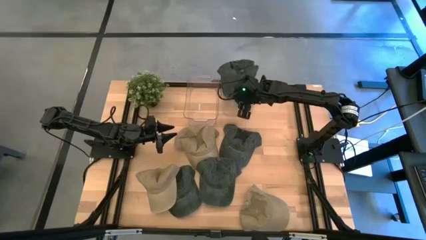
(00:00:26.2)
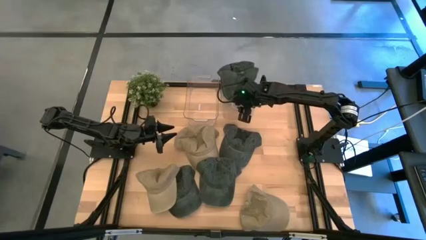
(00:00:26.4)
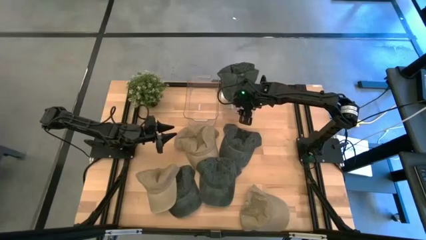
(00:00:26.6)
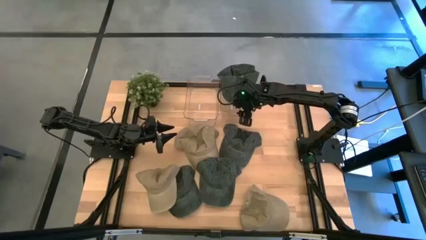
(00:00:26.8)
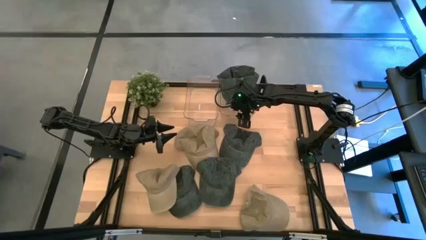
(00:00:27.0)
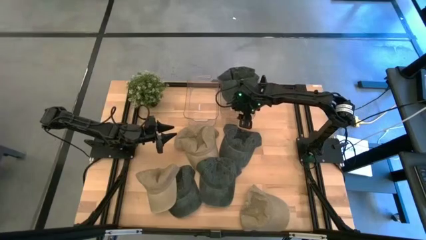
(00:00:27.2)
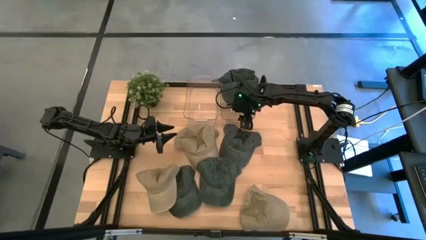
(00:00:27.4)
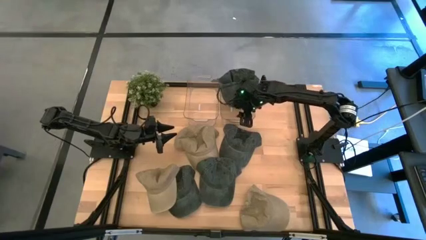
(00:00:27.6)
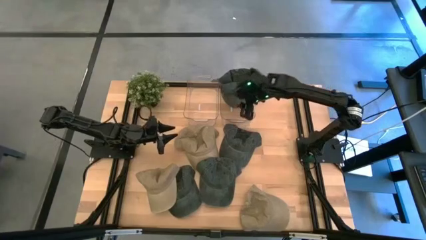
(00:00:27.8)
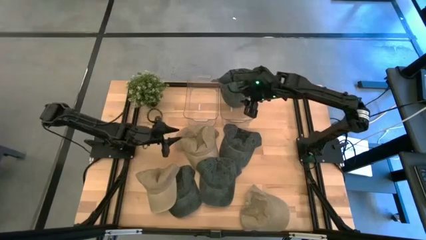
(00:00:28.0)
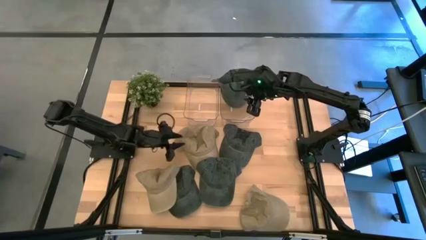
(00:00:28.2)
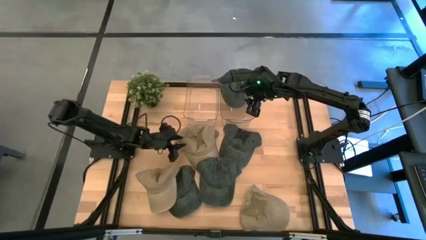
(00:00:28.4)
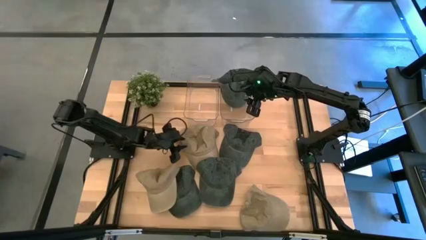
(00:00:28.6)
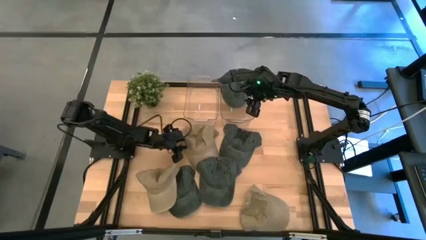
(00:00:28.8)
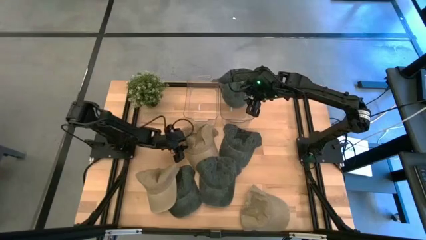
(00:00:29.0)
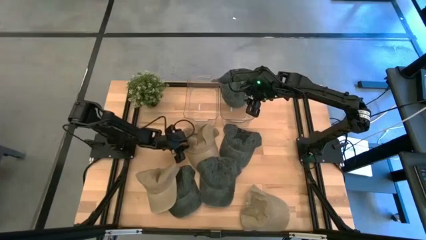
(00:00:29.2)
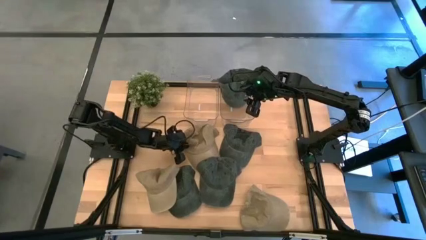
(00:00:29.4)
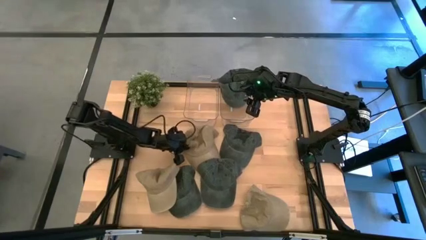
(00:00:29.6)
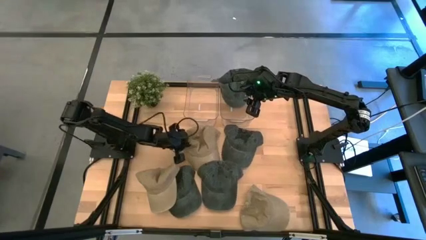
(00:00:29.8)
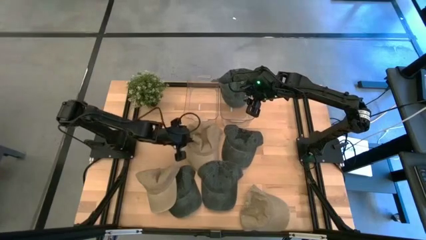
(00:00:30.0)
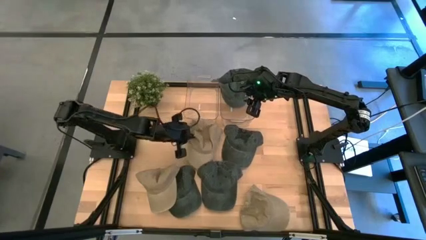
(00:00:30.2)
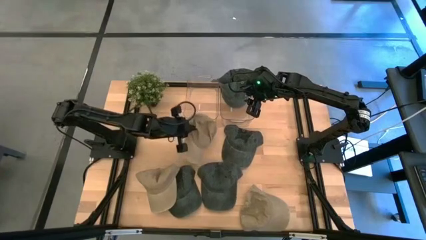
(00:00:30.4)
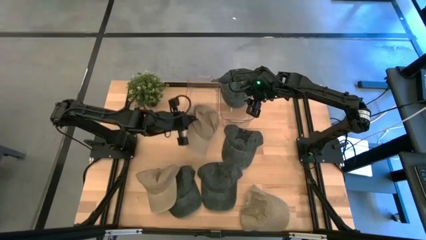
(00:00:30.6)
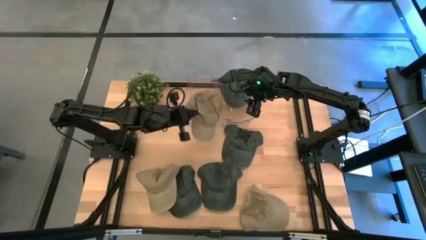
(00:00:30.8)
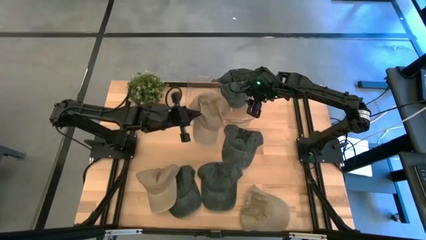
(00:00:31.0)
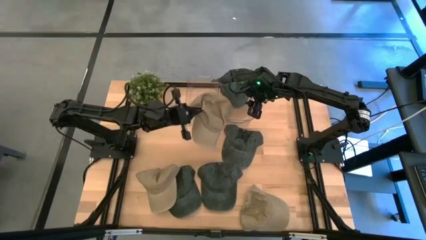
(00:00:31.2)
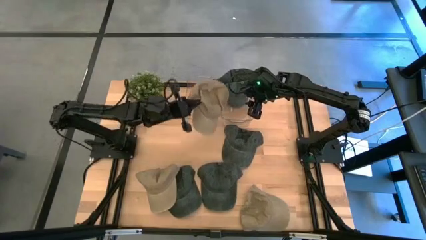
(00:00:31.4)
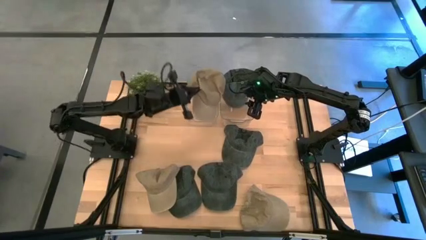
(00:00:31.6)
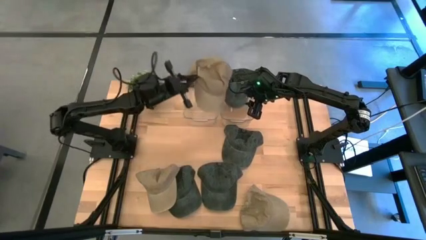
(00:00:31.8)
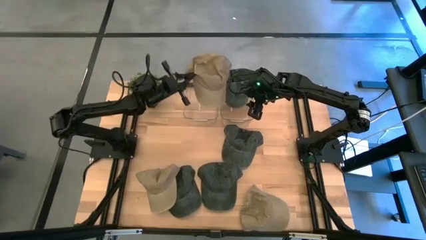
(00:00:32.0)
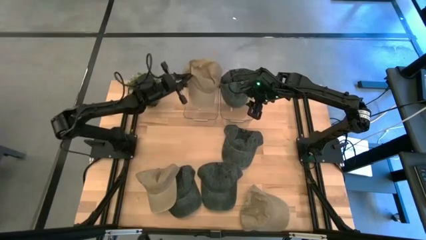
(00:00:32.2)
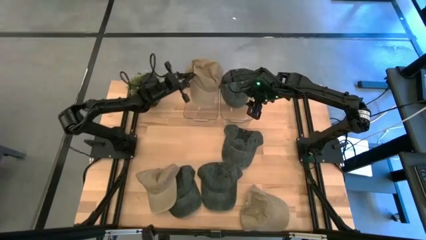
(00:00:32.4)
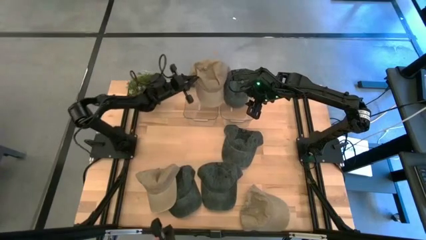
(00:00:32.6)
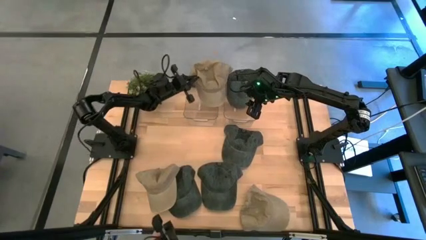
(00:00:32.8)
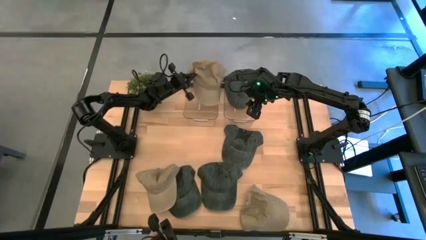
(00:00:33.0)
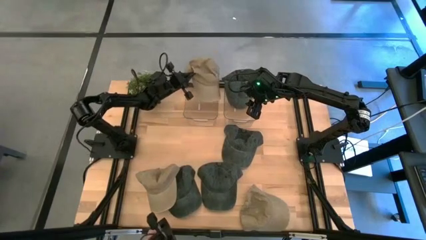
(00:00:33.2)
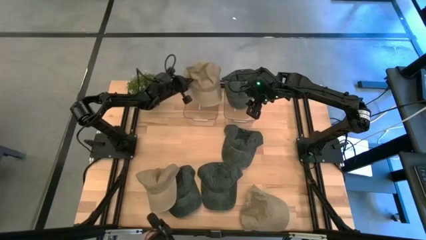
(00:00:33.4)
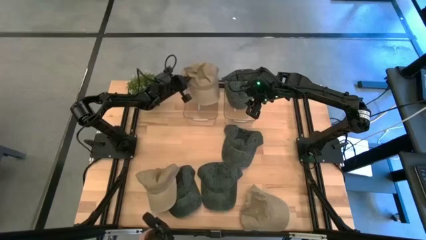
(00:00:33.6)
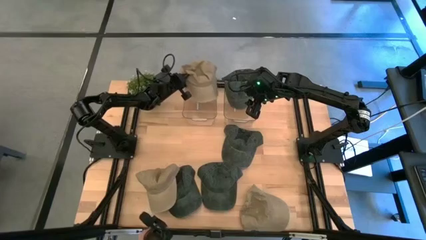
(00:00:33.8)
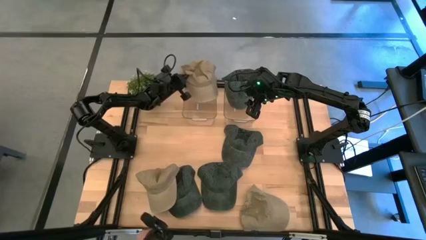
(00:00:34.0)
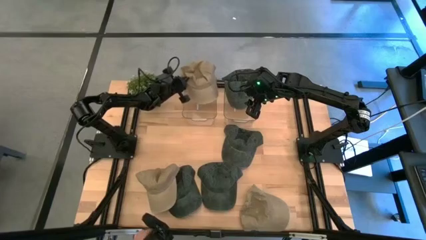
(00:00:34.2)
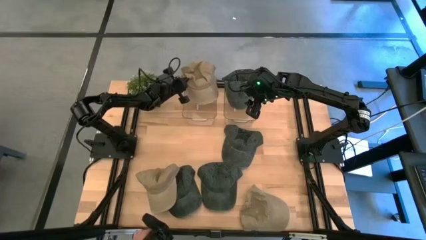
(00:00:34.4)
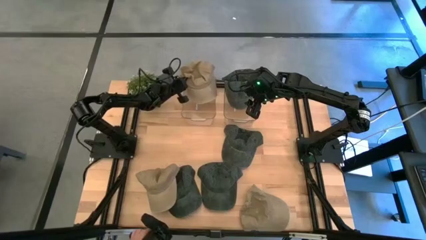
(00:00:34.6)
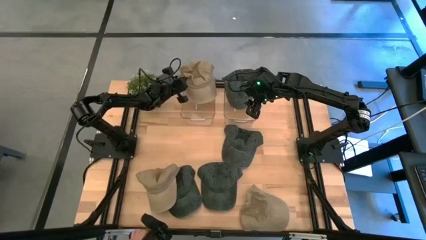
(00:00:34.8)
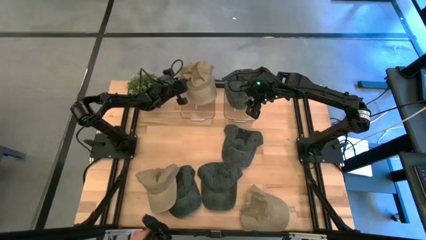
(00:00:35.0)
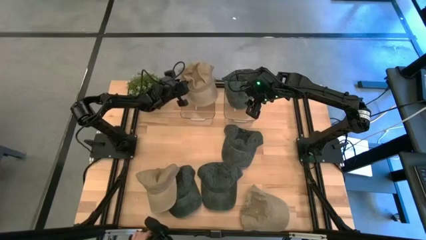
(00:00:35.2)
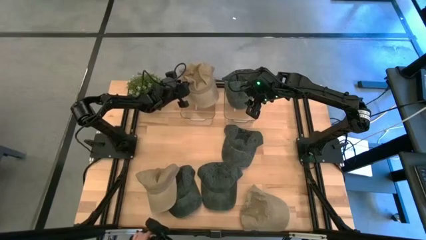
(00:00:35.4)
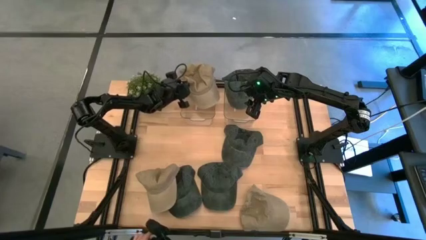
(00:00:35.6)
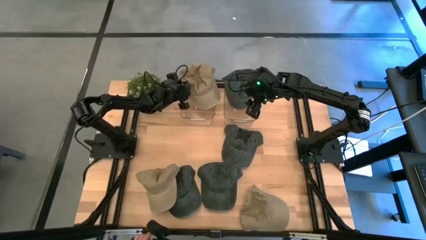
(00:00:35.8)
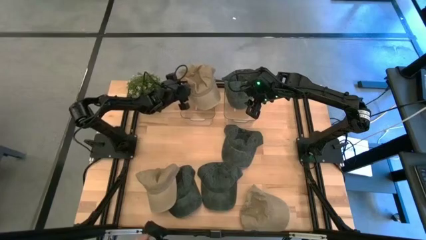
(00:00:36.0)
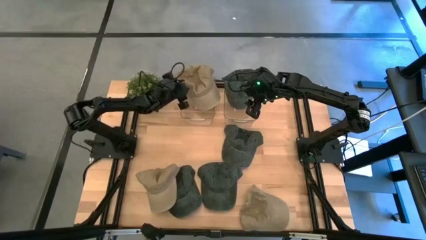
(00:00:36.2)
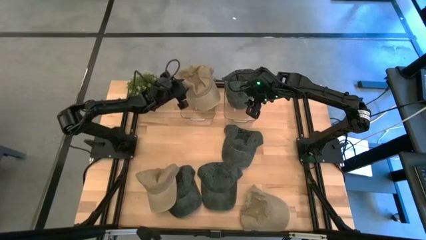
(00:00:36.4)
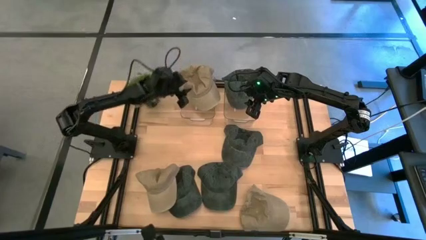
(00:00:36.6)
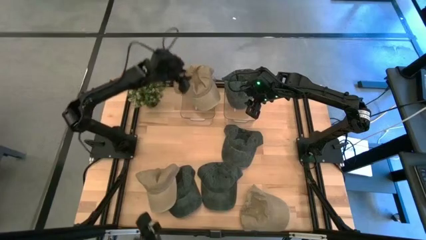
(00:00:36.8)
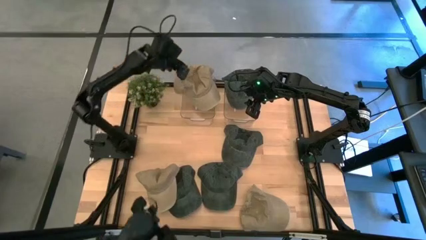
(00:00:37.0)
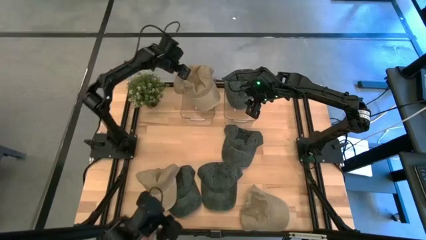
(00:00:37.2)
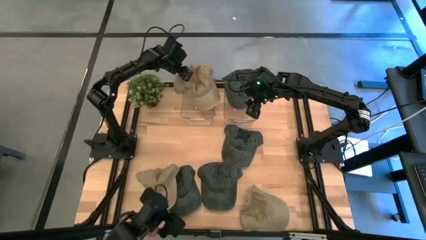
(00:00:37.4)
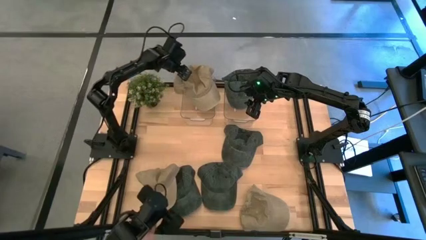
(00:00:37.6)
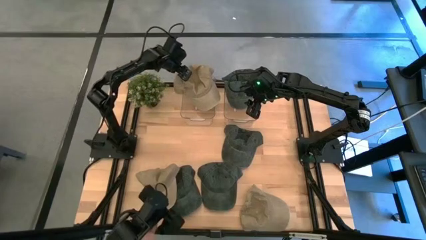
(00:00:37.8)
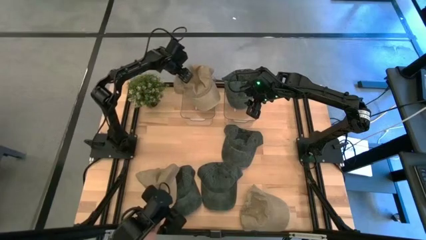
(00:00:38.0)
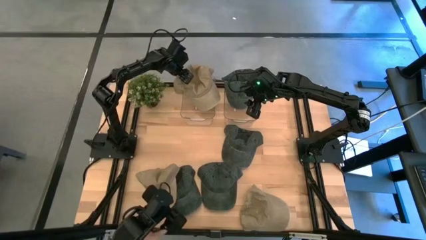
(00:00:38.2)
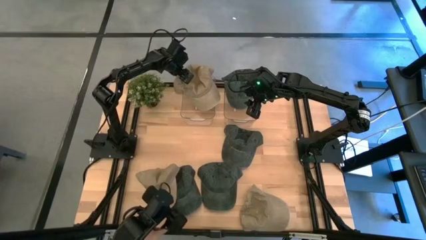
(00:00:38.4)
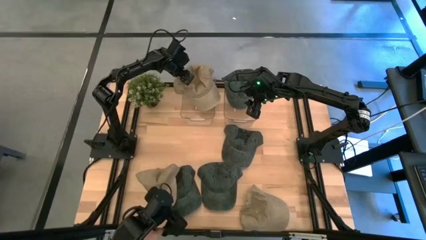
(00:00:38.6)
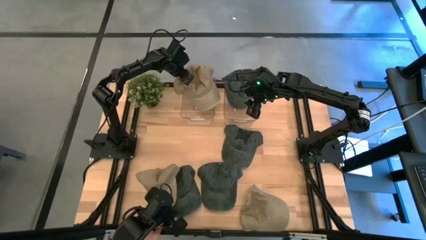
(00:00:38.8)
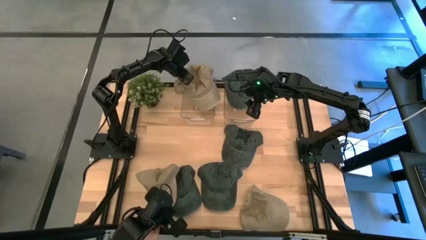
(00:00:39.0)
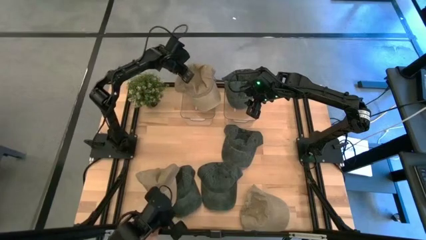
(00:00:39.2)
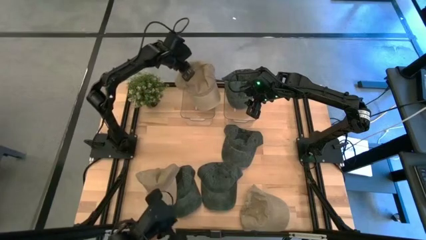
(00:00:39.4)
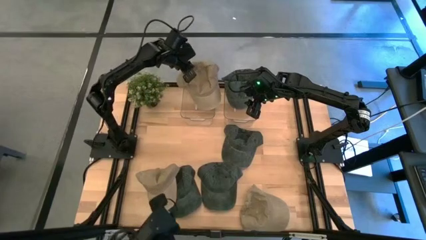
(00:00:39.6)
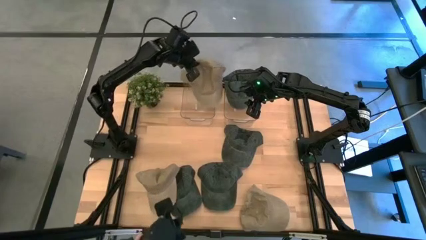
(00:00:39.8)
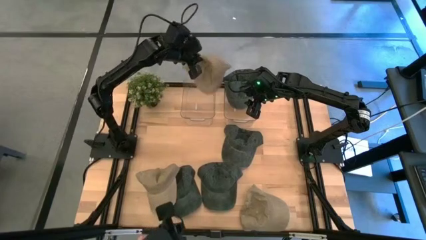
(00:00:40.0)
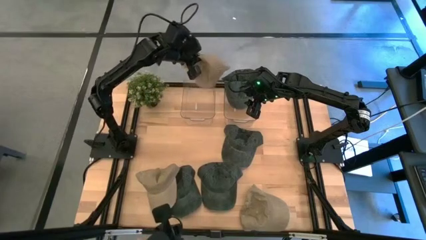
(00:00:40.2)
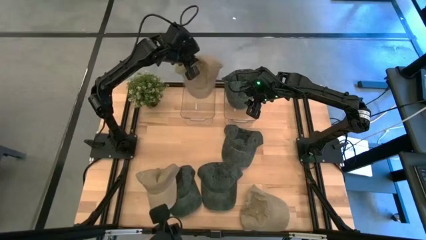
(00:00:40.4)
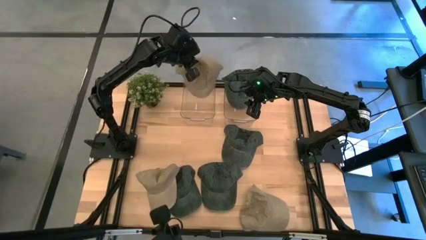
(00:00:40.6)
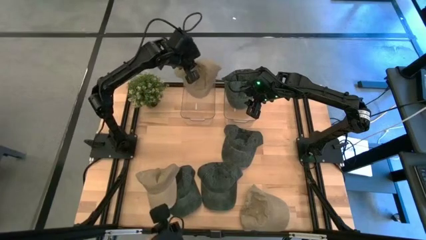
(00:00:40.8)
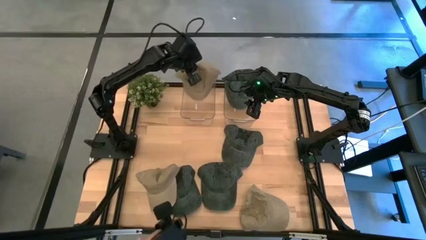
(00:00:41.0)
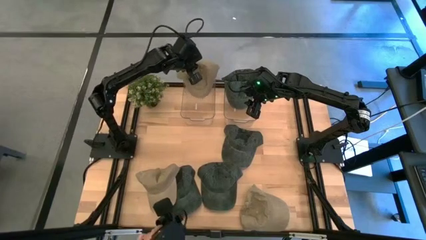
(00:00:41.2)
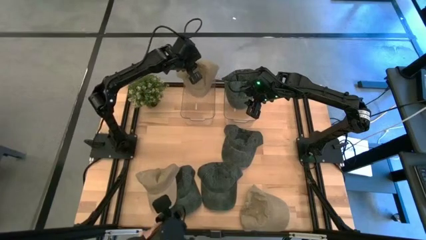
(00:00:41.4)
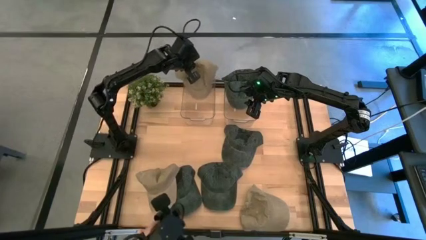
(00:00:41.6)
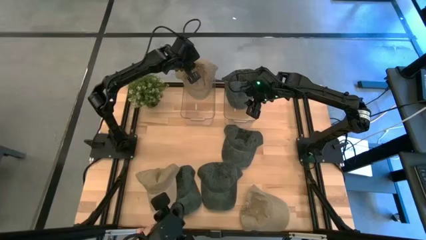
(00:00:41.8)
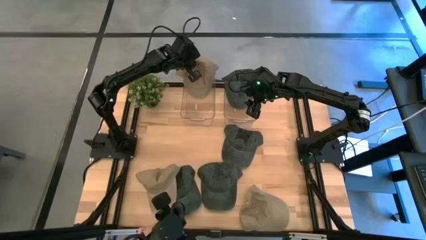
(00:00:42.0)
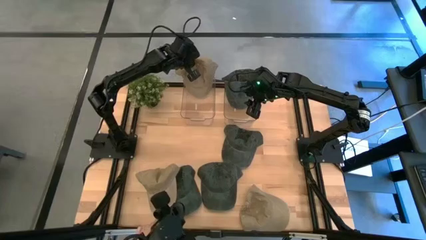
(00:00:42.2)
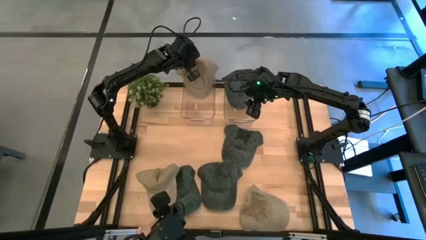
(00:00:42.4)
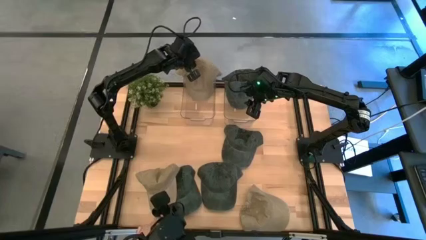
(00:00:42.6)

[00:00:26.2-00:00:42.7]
Task: Pick & Place hat
Put the brown cap into the left transparent bin
